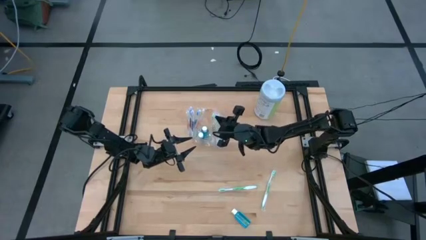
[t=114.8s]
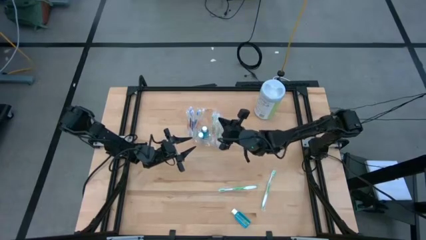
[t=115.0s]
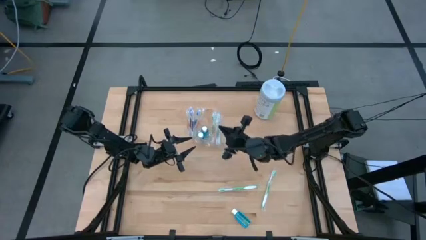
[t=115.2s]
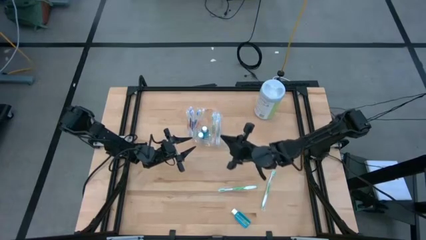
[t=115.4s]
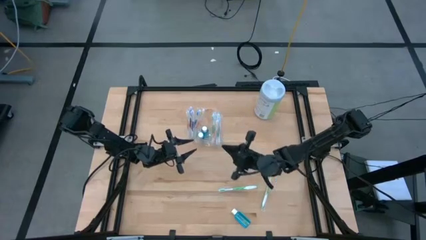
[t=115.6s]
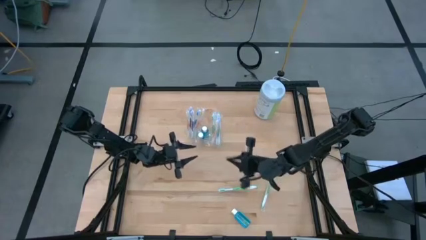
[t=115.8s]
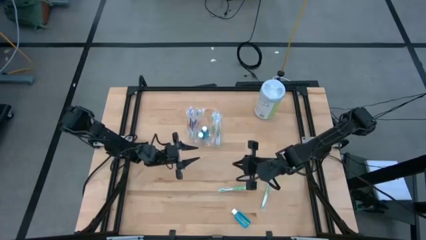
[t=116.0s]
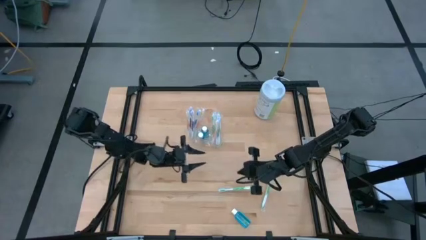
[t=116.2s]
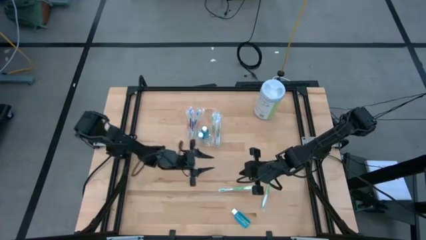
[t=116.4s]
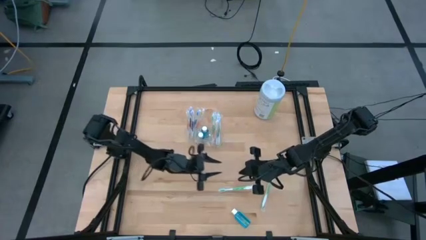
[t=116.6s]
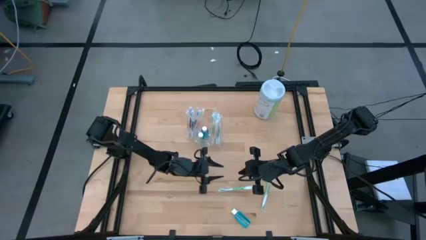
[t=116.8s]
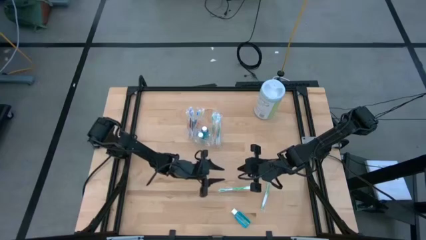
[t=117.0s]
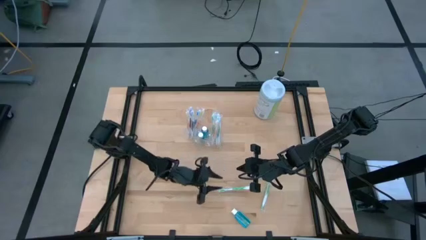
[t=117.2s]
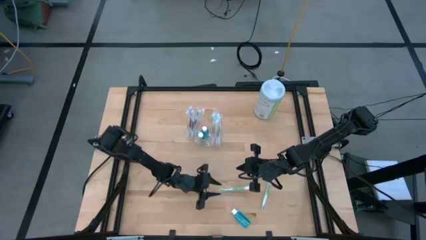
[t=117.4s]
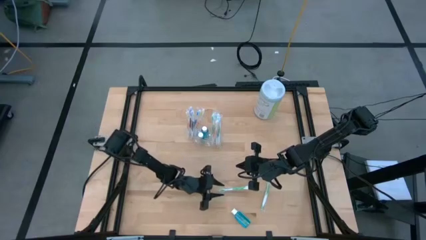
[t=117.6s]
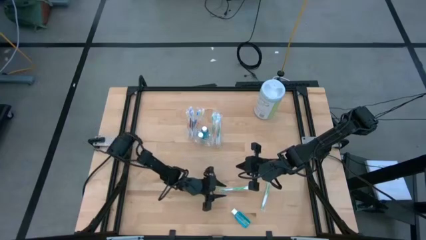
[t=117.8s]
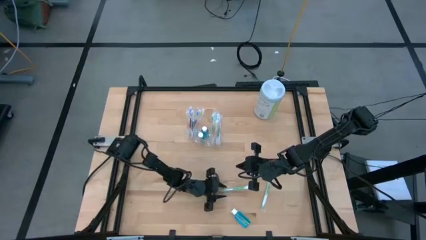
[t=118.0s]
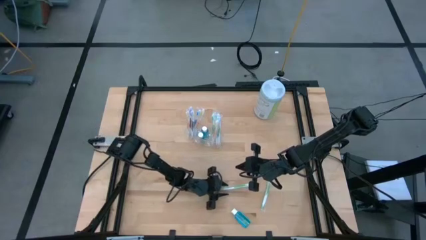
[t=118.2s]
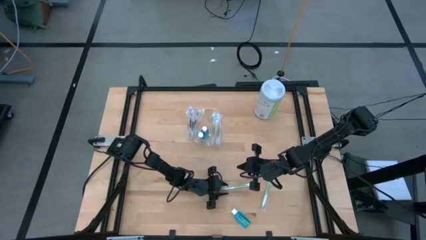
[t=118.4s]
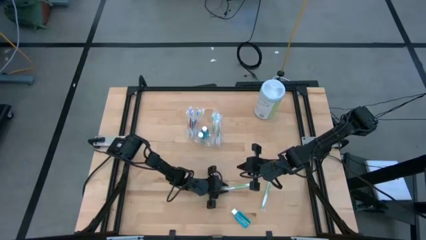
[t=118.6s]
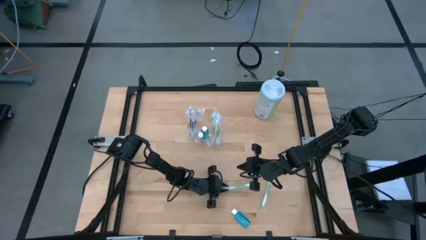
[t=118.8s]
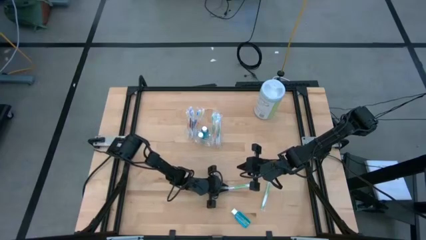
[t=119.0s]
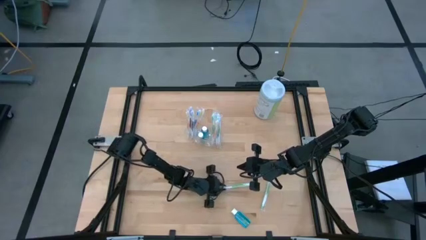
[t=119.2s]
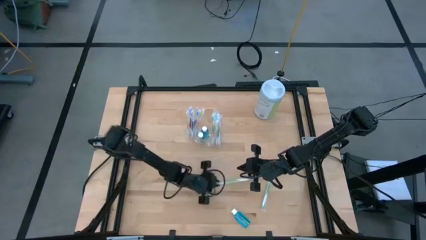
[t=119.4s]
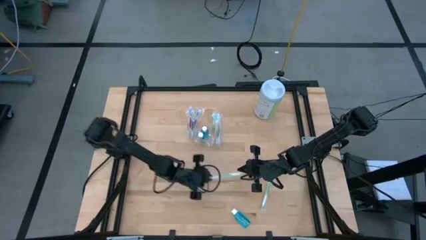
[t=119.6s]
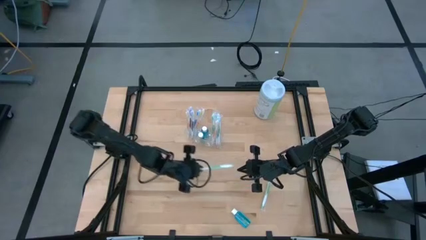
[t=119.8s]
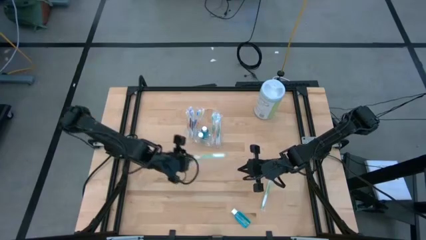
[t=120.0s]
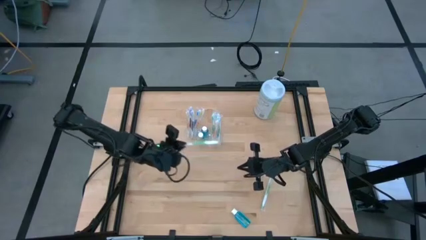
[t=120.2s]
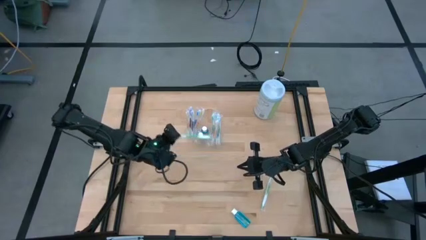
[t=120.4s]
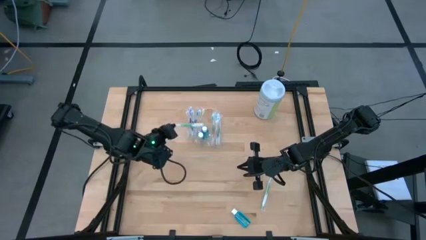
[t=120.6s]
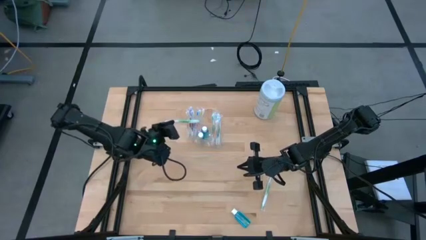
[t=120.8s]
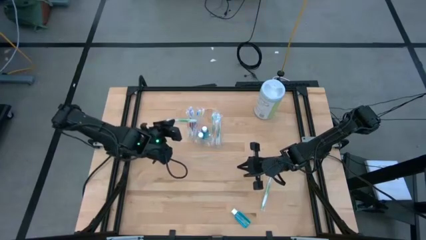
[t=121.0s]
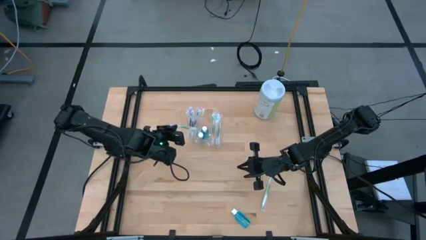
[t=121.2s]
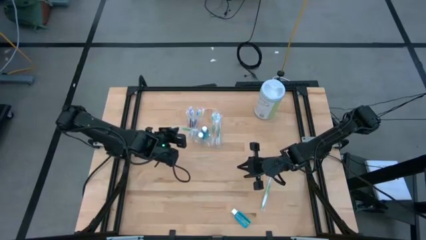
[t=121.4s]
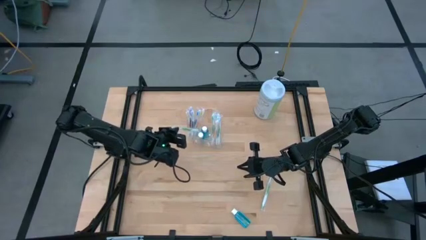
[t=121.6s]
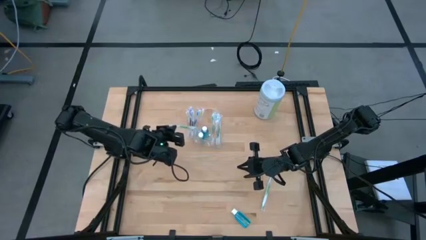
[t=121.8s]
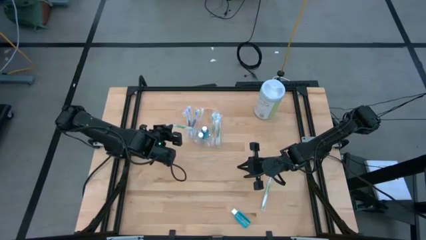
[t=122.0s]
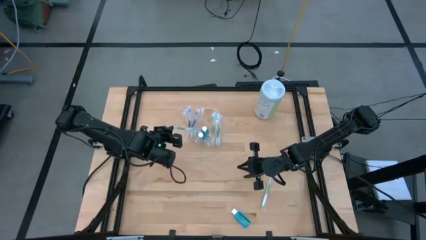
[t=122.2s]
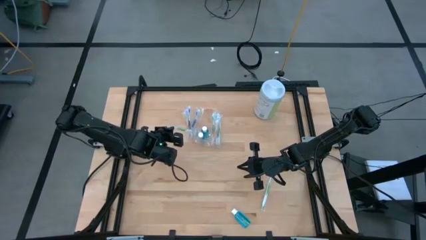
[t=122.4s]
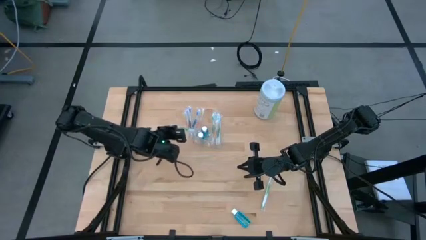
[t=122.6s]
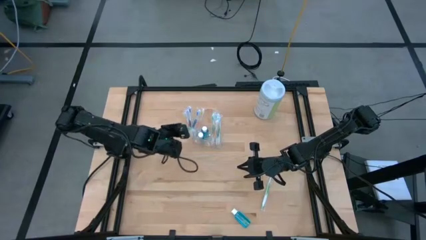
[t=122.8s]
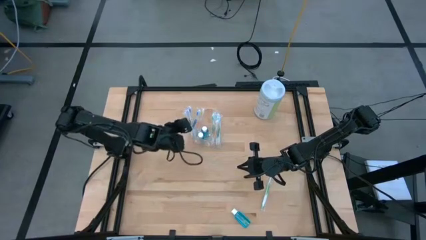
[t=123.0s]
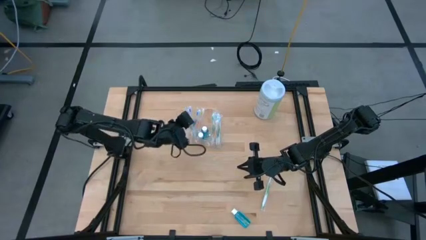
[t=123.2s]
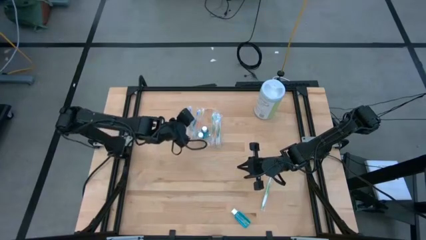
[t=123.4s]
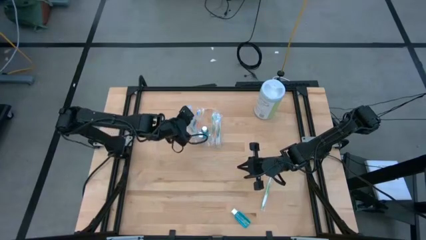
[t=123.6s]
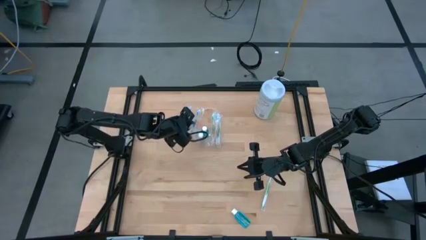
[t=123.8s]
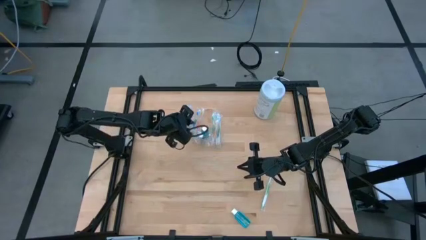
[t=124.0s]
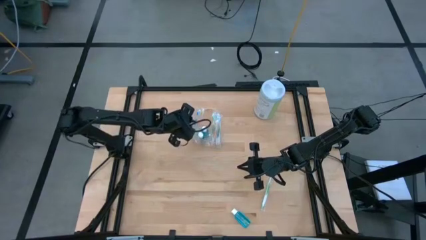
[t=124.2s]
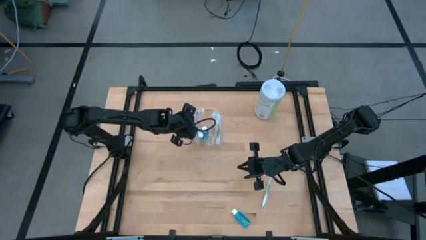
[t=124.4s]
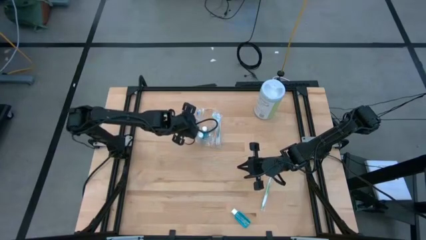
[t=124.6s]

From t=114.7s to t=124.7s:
Task: Pick & Place toothbrushing station
Put the left green toothbrush into the transparent organizer

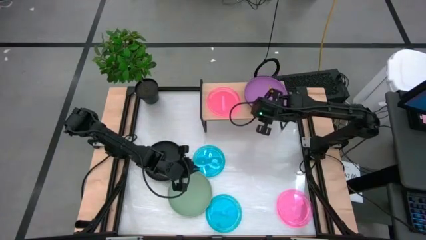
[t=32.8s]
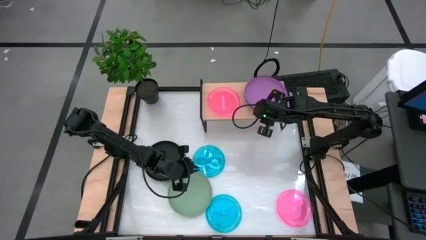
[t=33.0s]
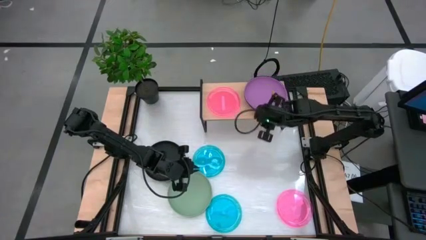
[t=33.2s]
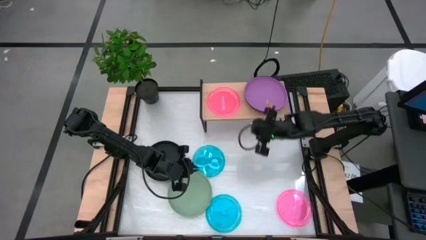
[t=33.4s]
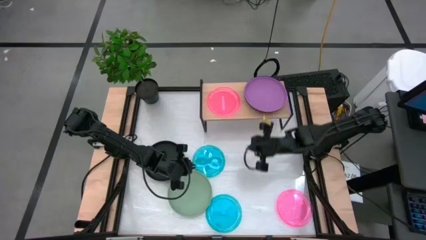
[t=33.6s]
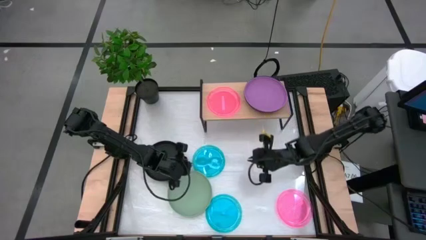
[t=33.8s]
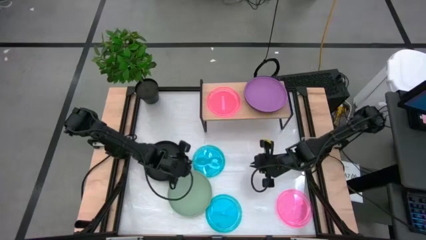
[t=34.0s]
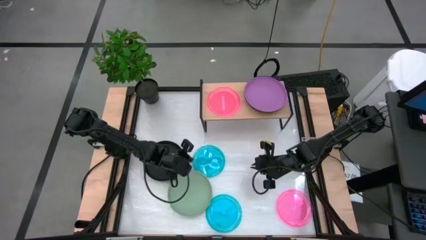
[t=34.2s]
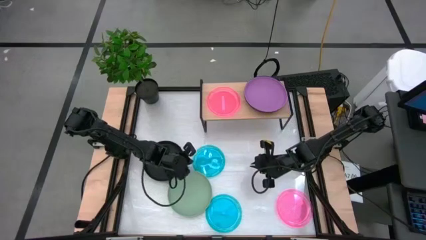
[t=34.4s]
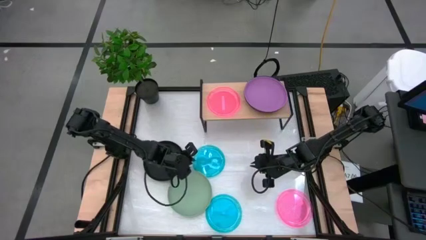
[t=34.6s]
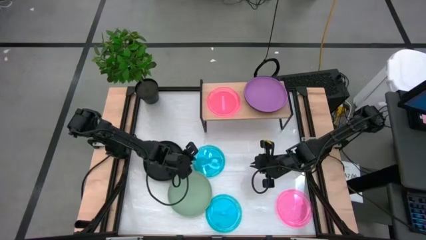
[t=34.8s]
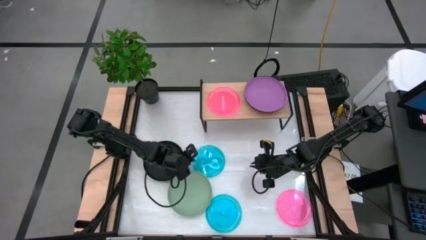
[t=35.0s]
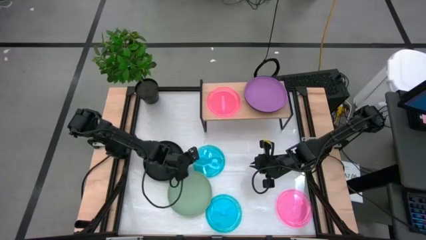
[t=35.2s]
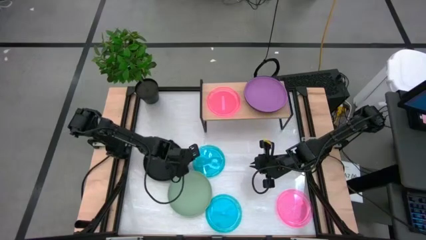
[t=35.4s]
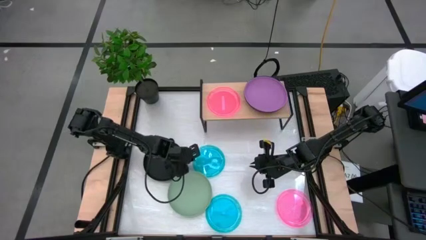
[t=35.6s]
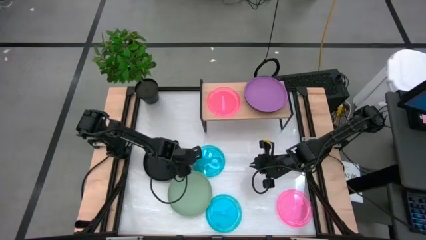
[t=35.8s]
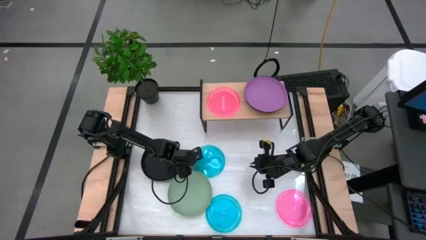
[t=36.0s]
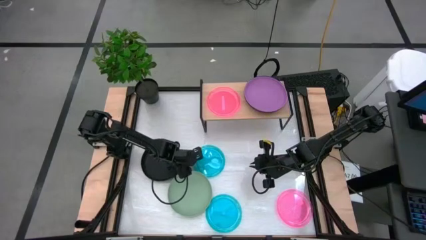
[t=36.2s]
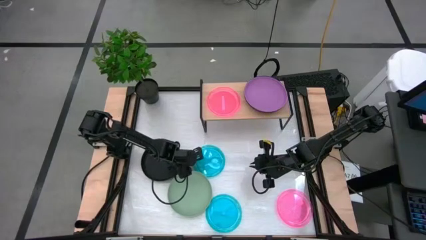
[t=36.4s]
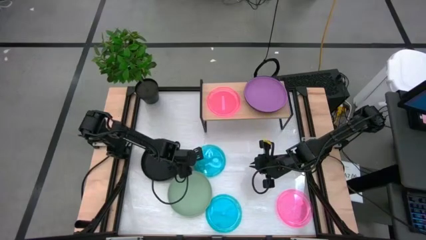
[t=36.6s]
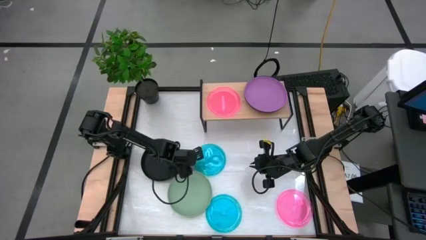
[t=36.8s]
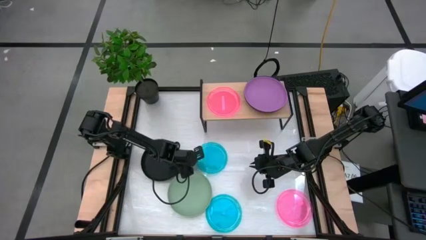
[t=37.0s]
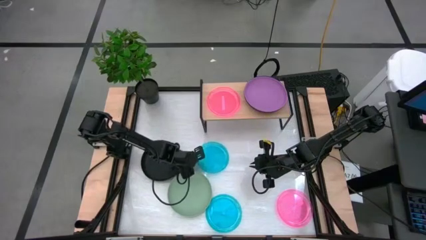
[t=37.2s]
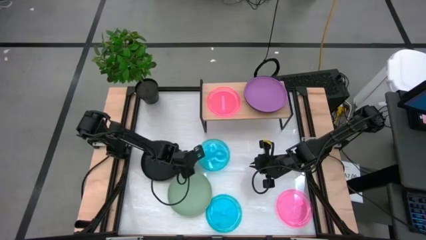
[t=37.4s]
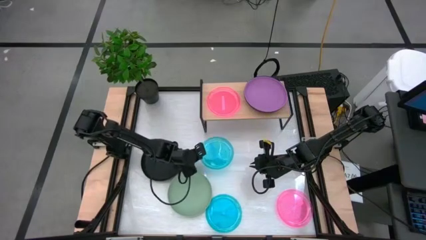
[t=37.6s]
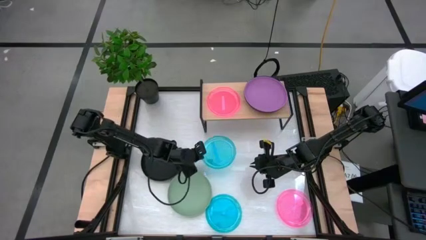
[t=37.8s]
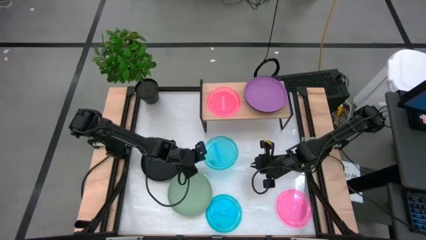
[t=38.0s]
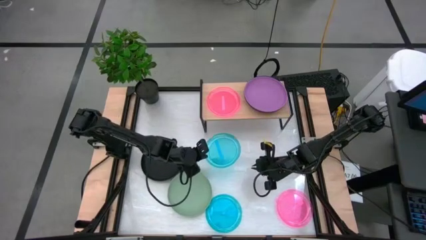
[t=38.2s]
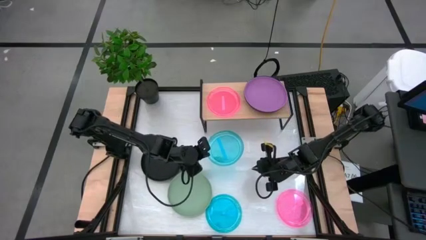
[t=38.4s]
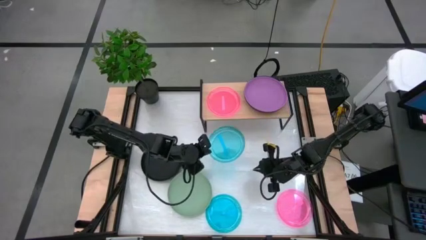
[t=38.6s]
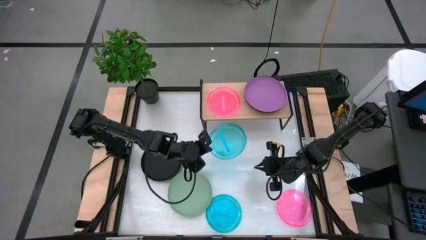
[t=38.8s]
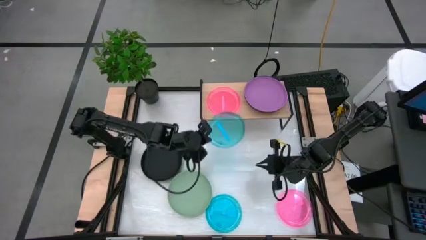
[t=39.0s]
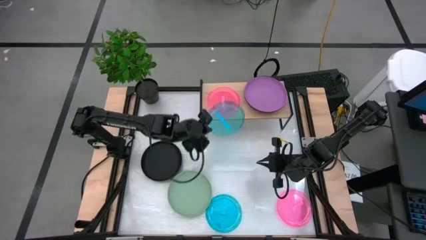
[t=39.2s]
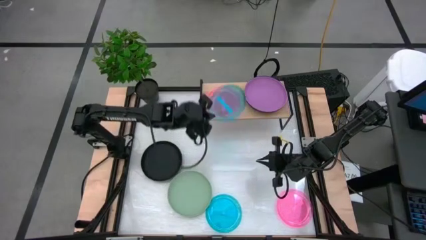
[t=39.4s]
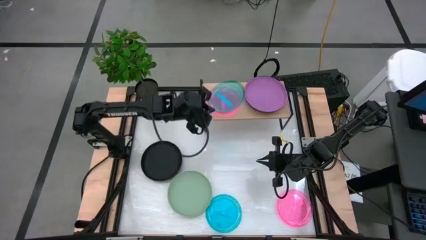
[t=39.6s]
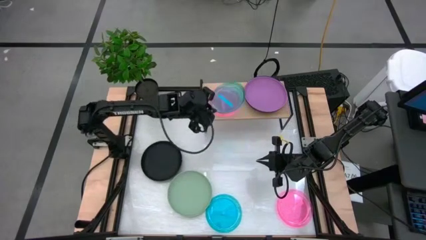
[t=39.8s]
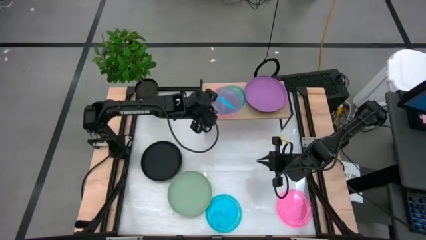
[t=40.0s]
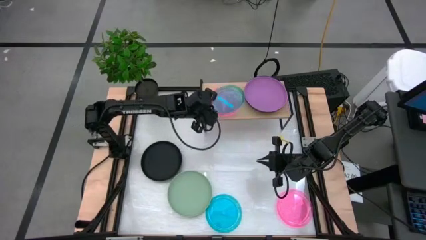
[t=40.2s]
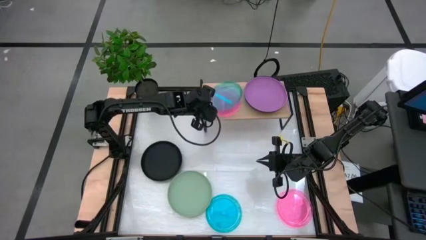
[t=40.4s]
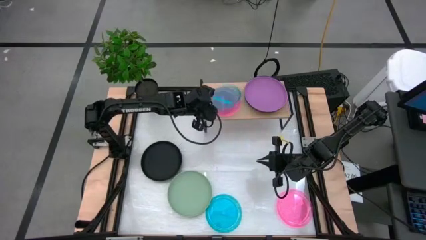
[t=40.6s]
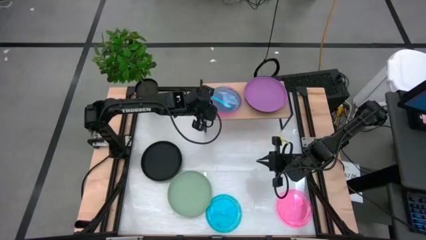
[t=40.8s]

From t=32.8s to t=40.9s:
Task: Place and stack plates onto a shelf
Stack the top blue plate on top of the pink plate on the shelf
